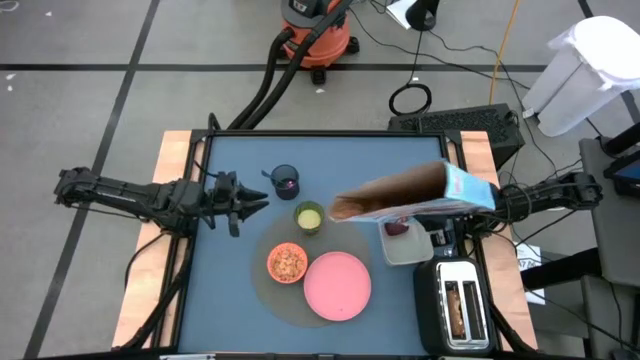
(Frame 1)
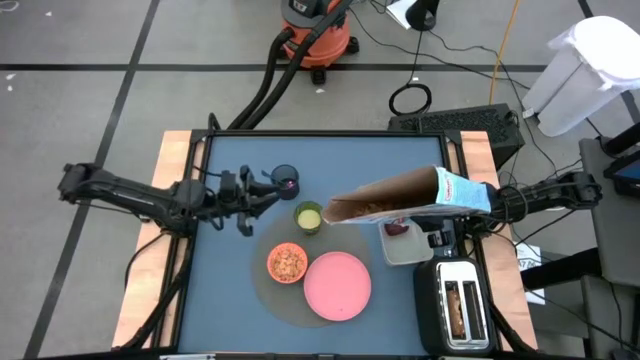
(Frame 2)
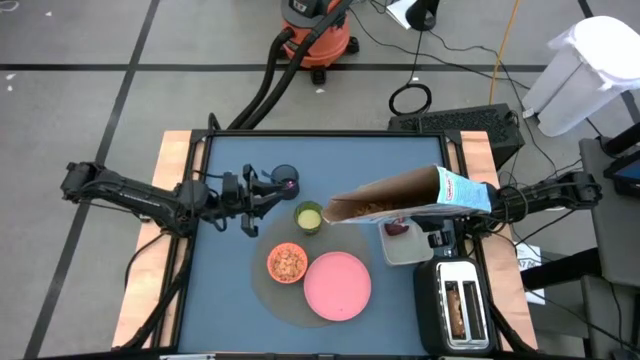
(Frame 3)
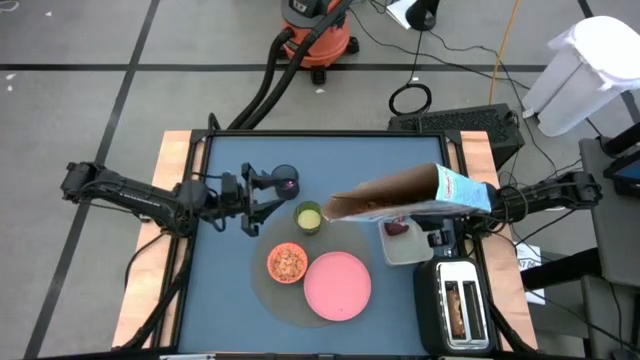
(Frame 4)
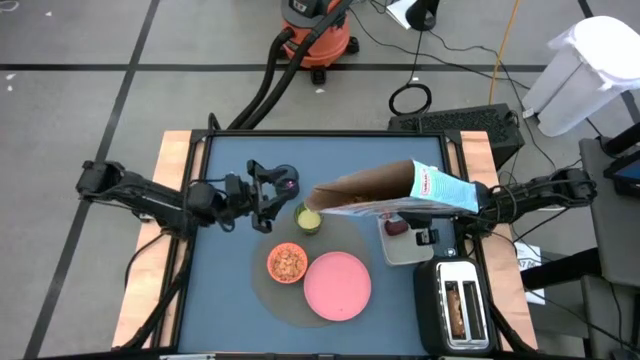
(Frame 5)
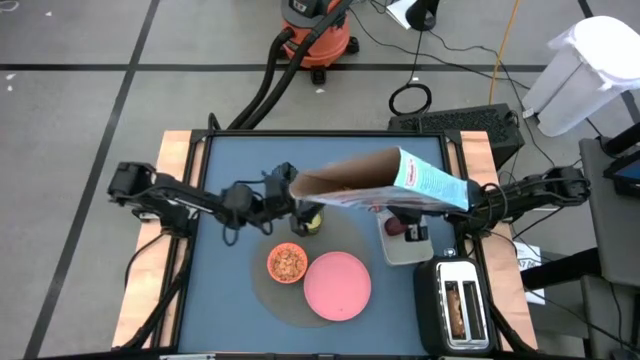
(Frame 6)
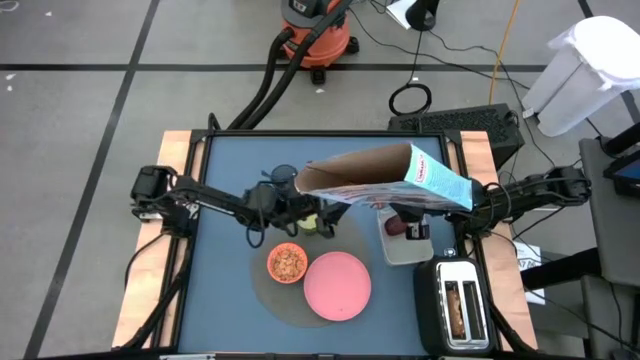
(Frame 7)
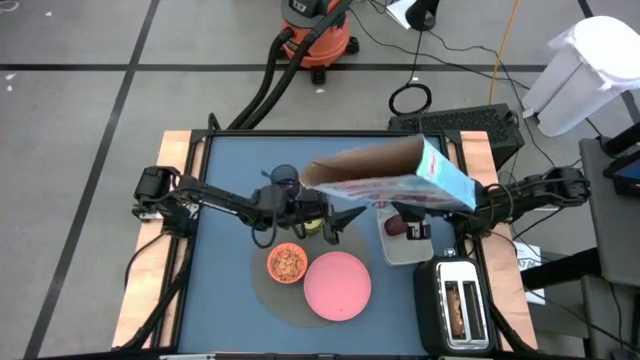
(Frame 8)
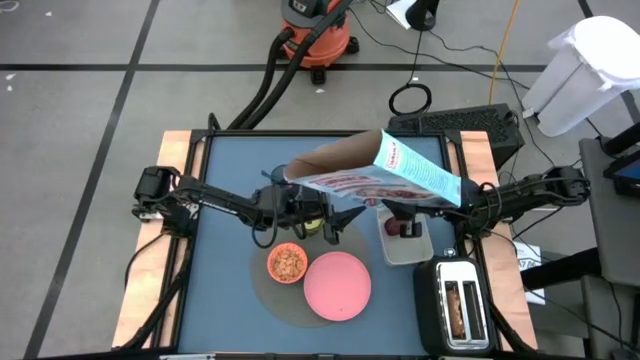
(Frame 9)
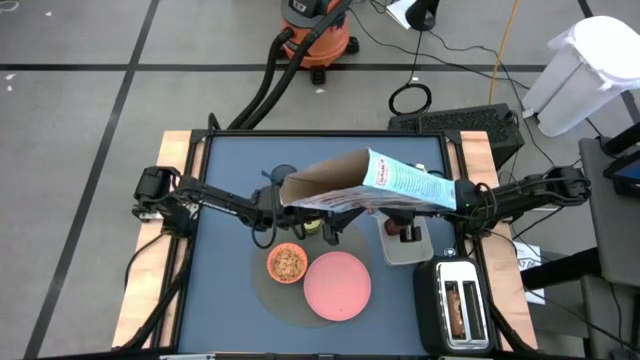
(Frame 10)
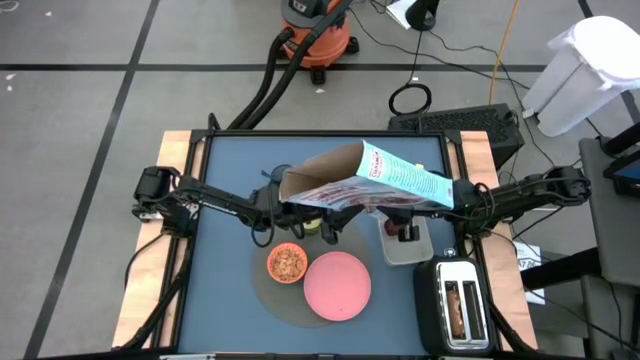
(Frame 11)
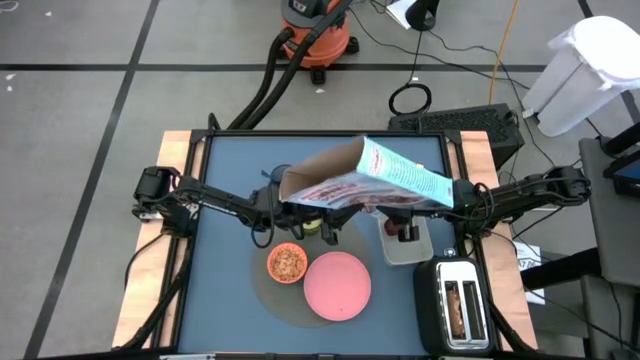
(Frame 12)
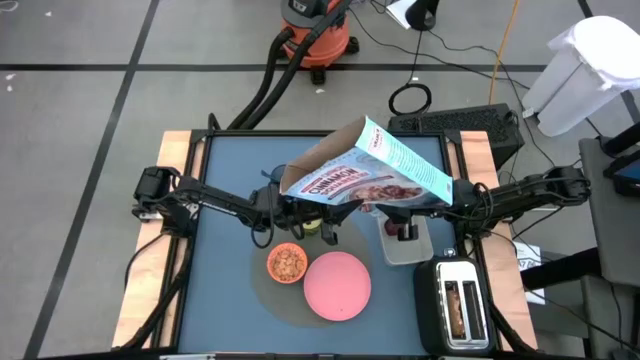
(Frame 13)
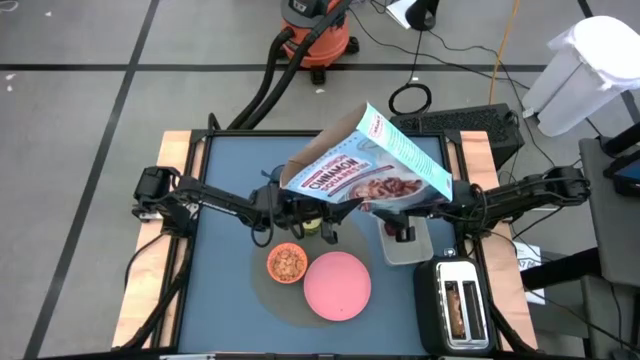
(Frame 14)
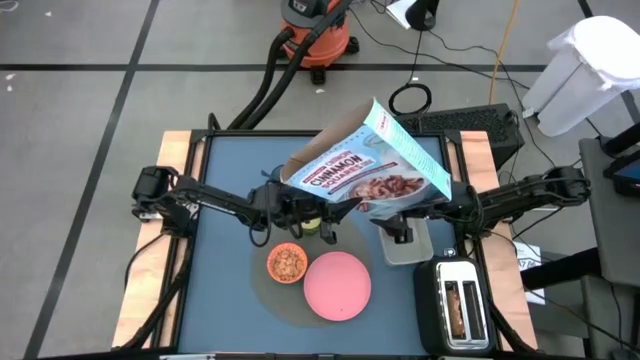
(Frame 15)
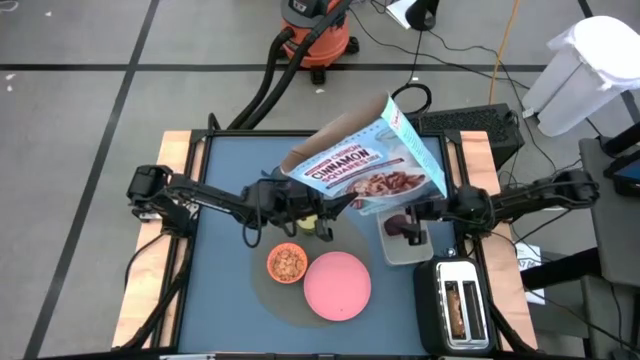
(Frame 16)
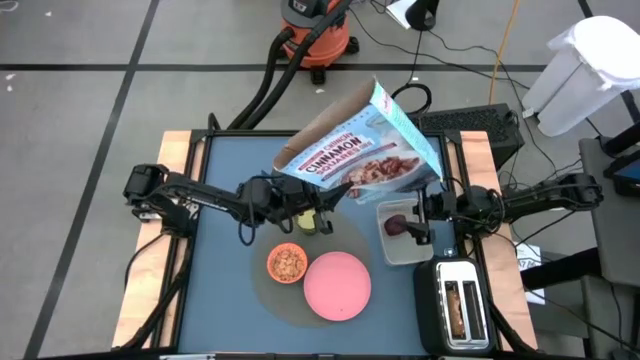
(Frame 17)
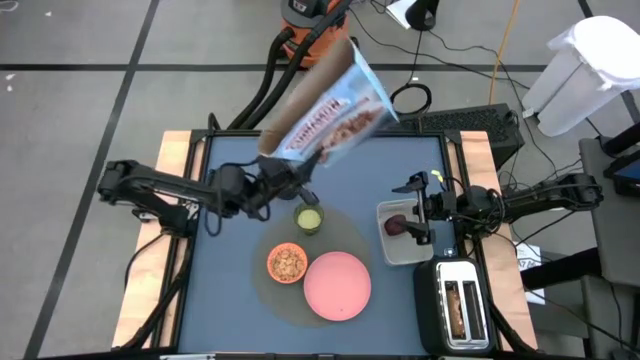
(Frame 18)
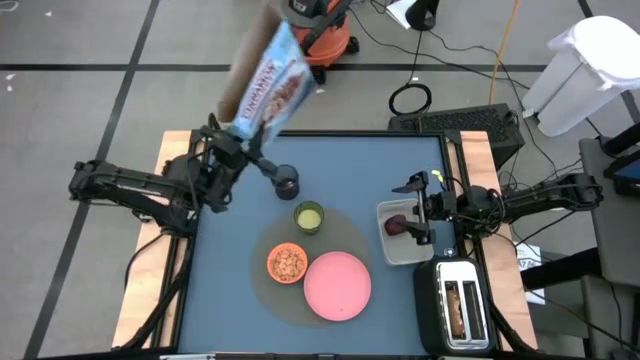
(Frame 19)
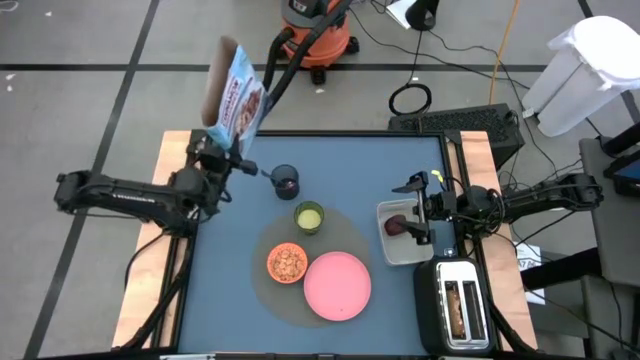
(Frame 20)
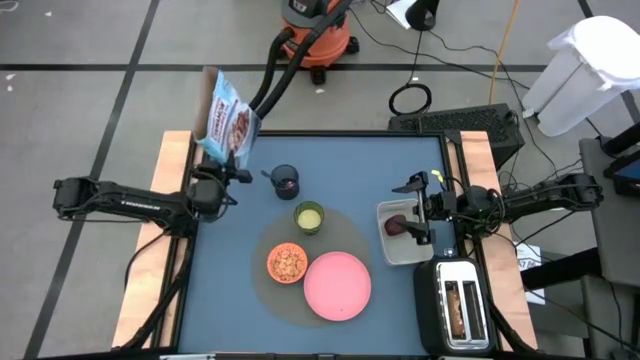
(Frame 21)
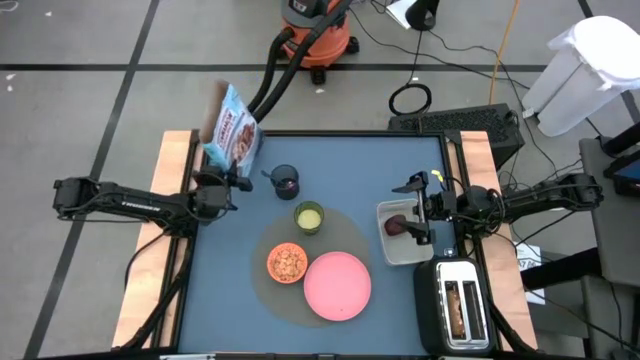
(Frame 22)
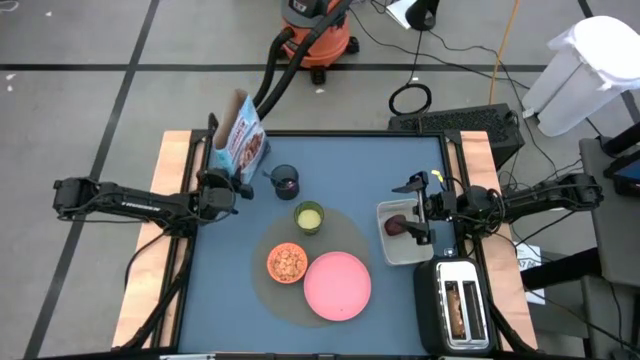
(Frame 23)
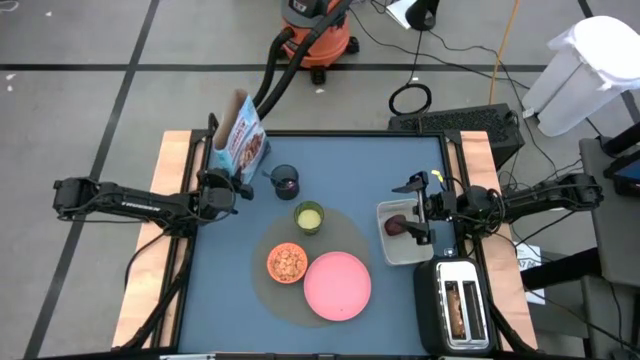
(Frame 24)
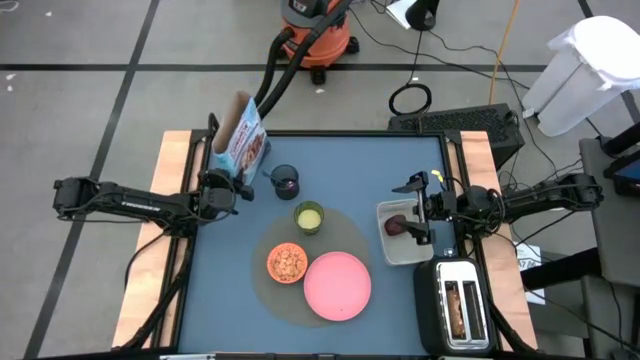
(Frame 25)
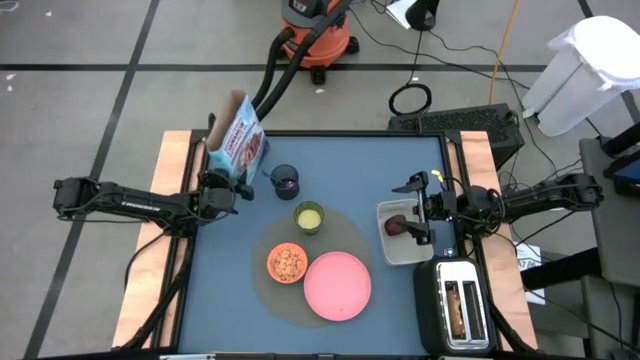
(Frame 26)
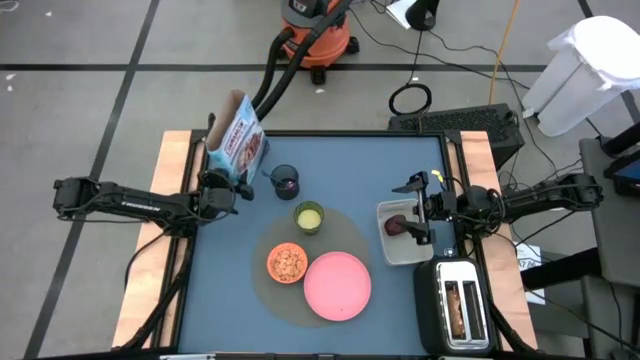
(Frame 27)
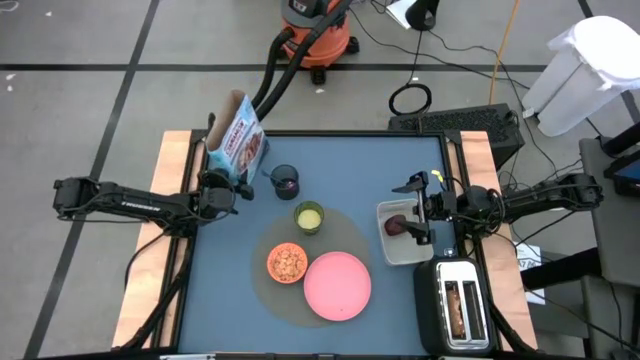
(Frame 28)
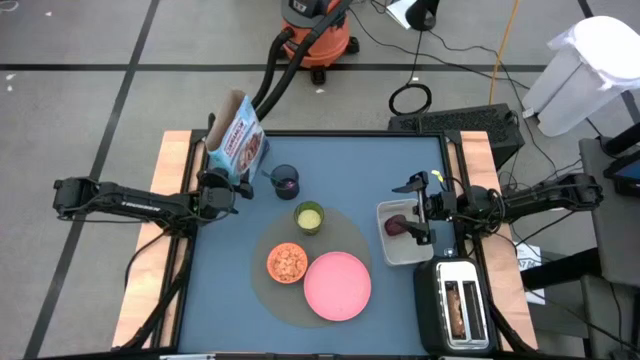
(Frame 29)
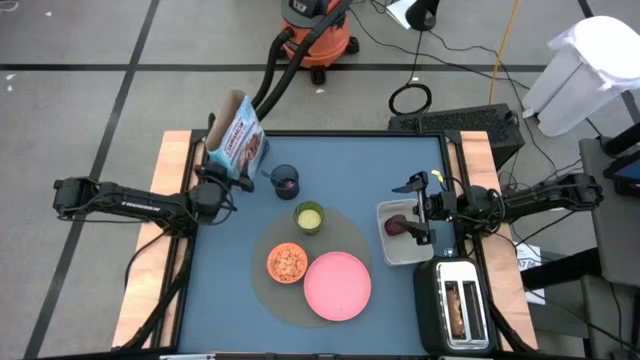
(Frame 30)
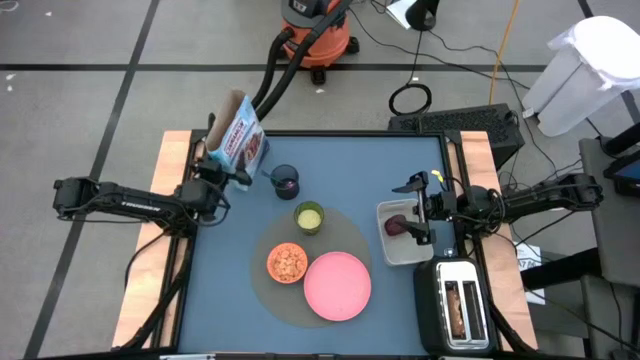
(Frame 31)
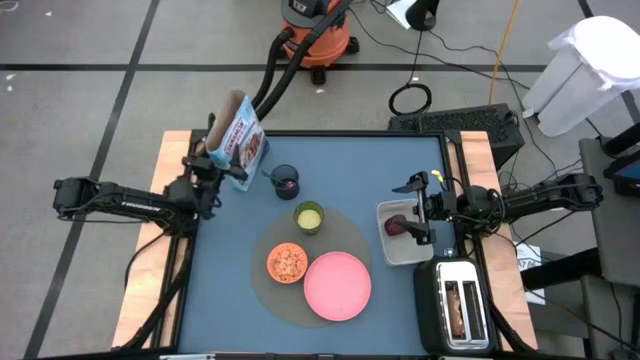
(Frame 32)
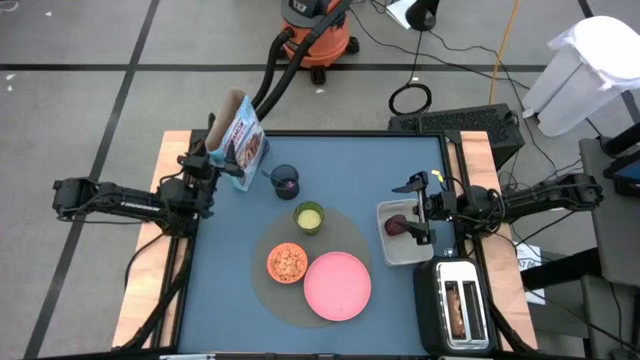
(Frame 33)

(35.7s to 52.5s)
Task: Arrange a breakfast setting
Pour the cereal from the cereal box into the red bowl

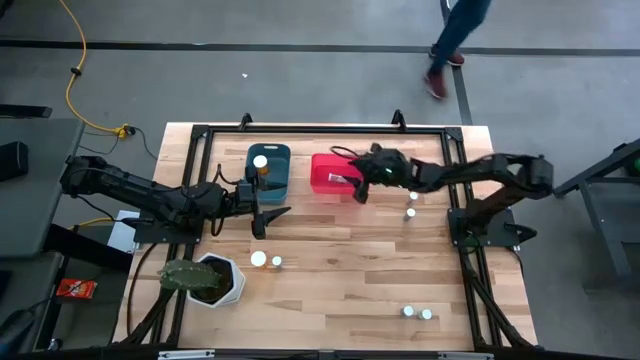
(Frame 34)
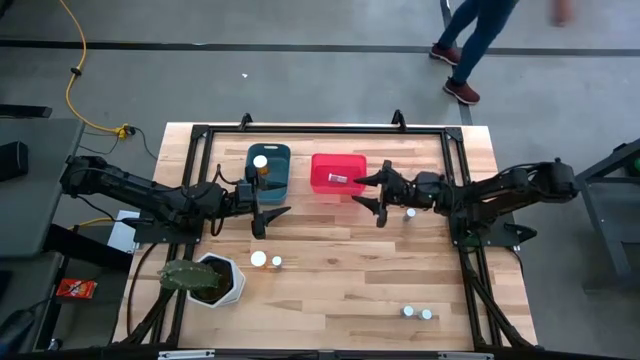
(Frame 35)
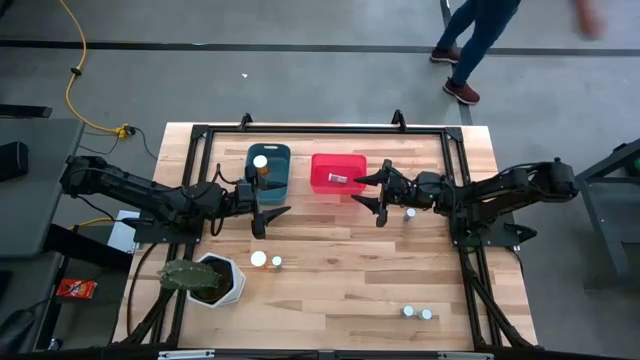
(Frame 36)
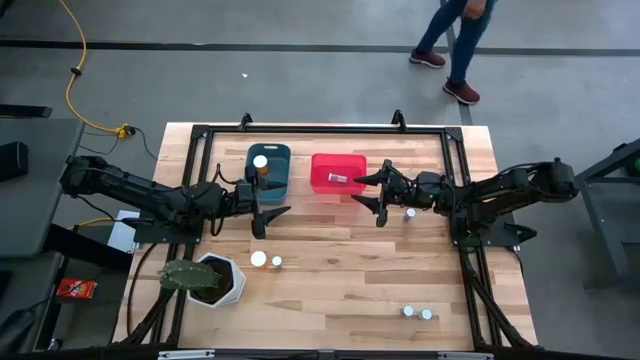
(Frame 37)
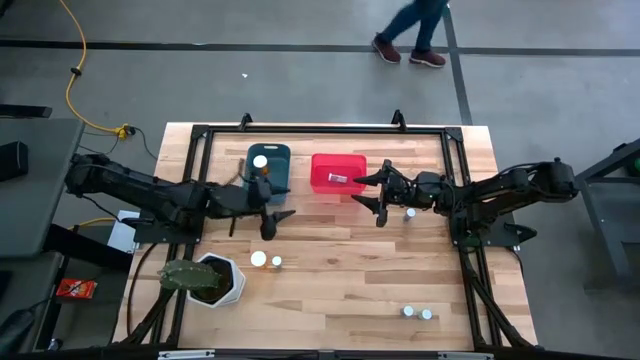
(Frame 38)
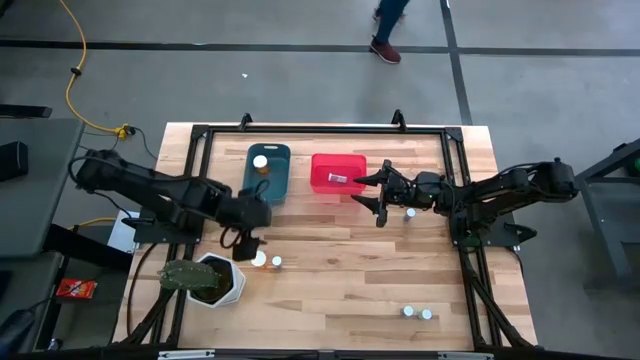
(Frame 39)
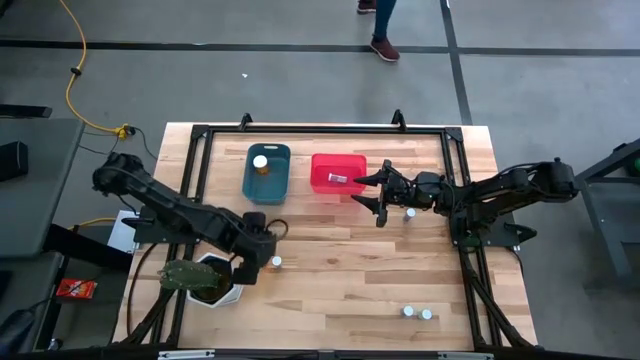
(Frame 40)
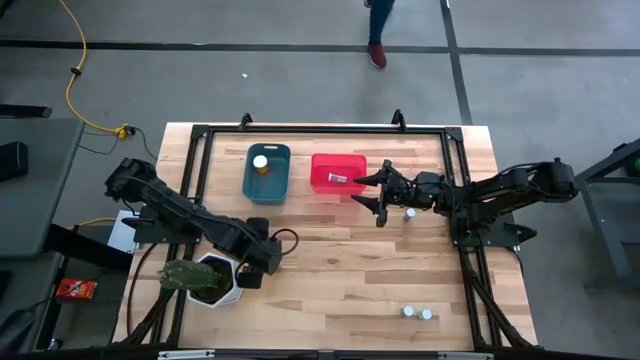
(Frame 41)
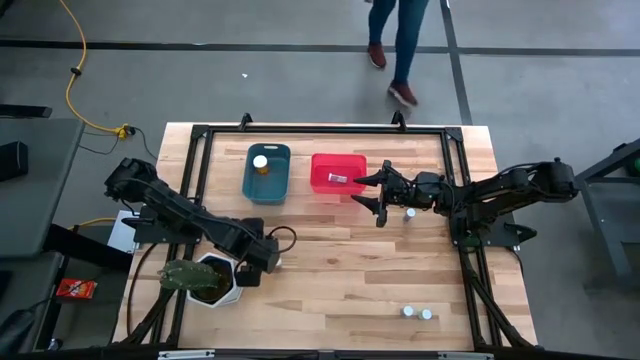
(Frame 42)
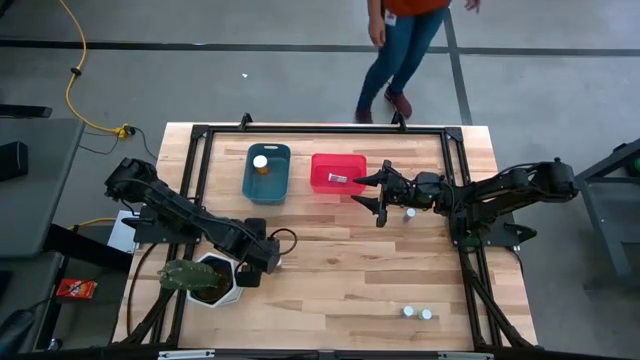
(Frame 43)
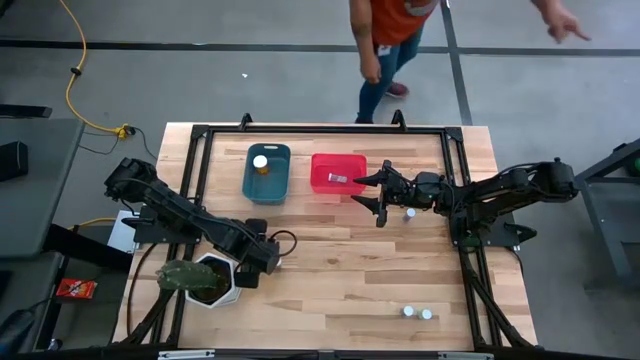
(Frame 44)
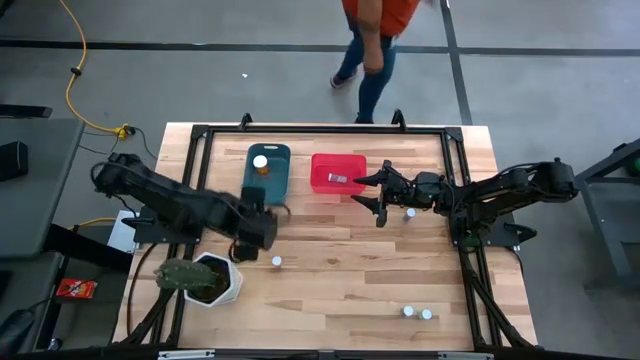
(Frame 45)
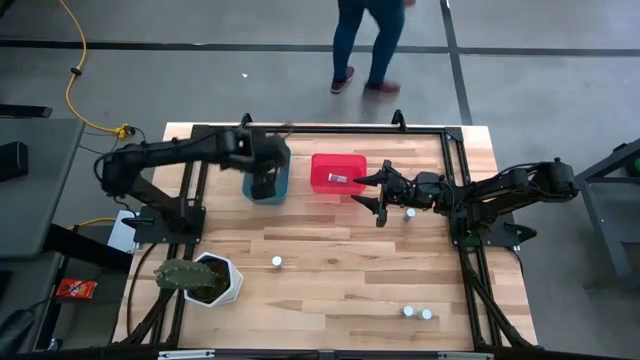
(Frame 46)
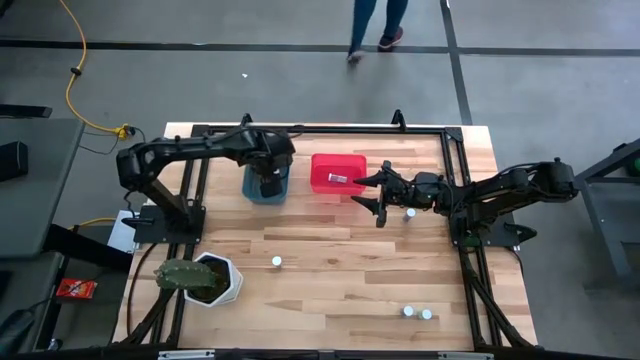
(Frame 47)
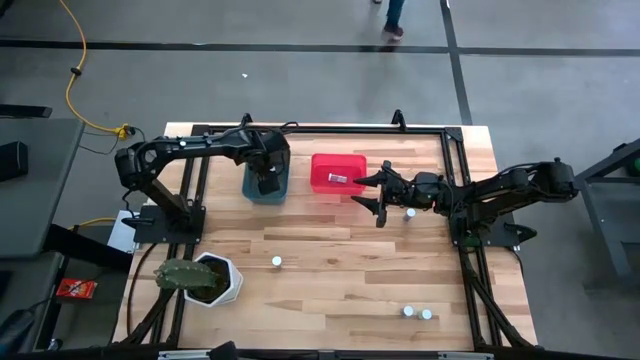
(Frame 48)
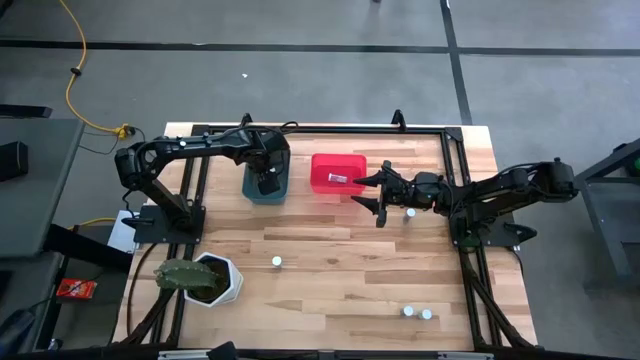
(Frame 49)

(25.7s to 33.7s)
Task: Pick and place medicine bottles into bin by pill shape (circle, oval)
Put the orange capsule bottle into the blue bin
